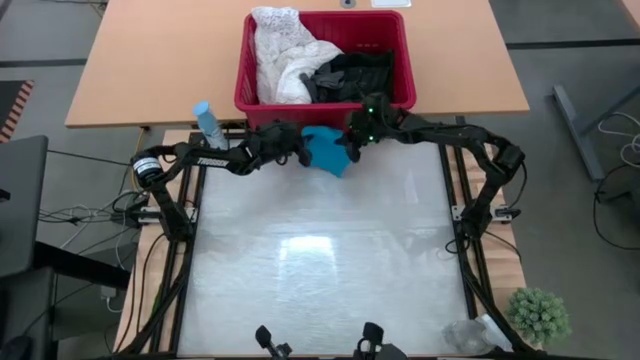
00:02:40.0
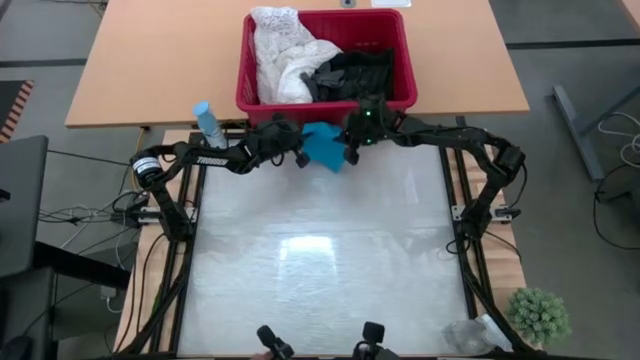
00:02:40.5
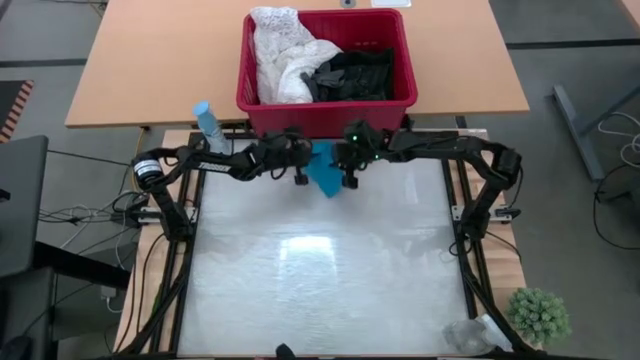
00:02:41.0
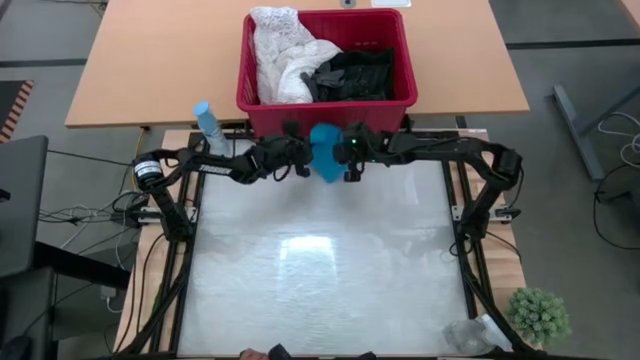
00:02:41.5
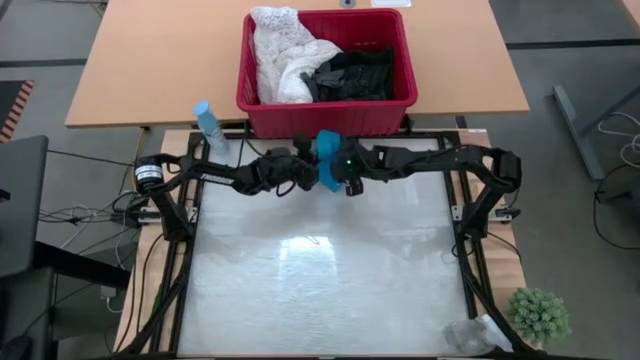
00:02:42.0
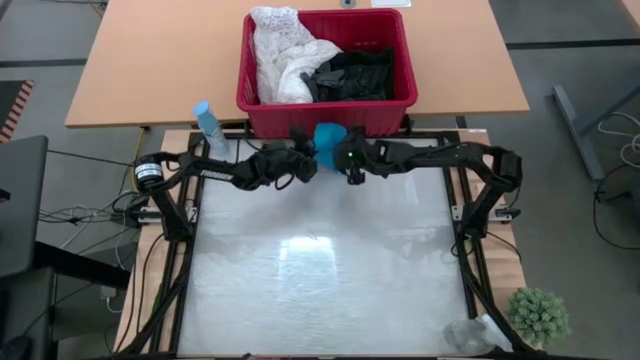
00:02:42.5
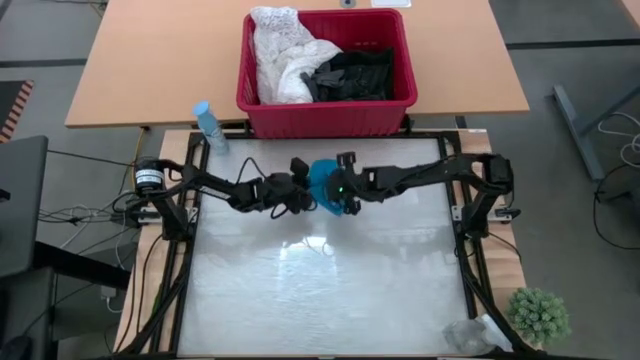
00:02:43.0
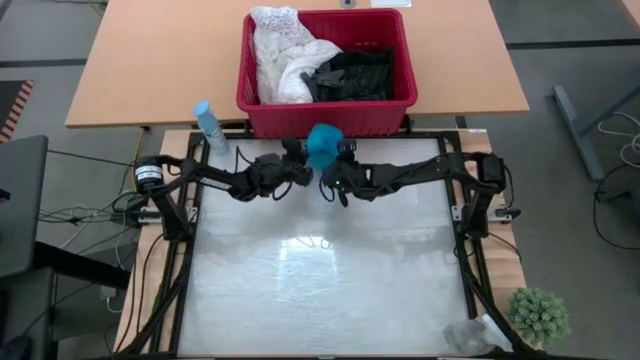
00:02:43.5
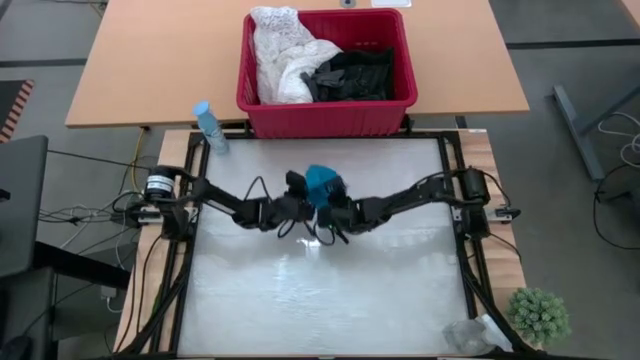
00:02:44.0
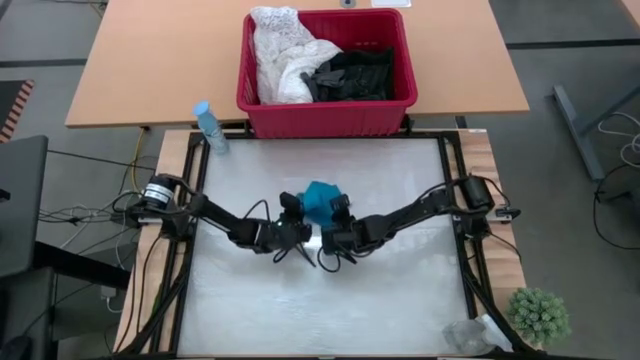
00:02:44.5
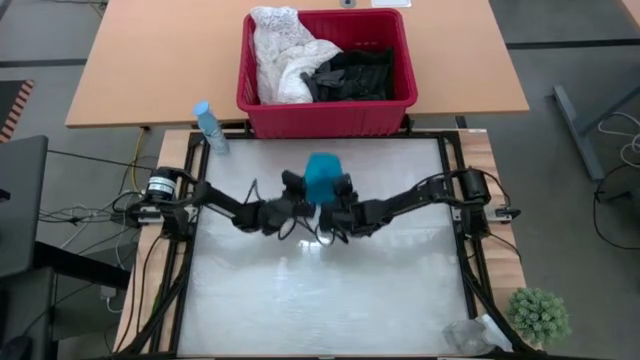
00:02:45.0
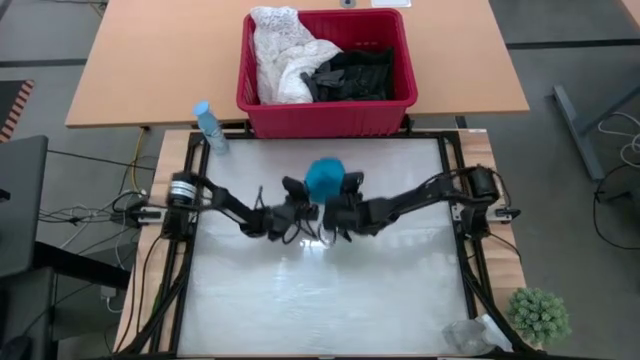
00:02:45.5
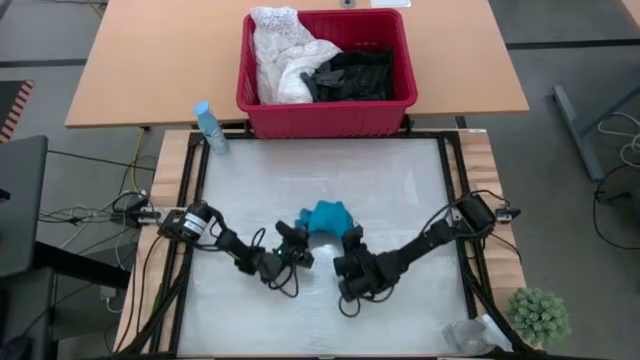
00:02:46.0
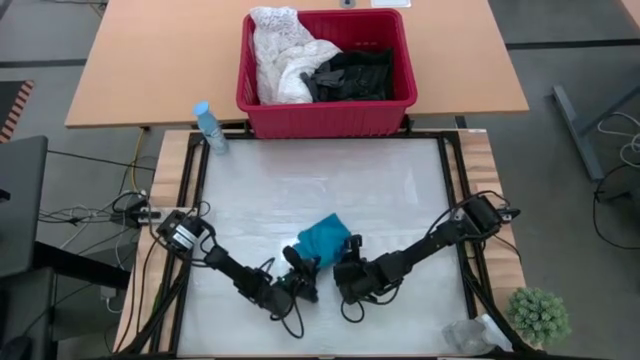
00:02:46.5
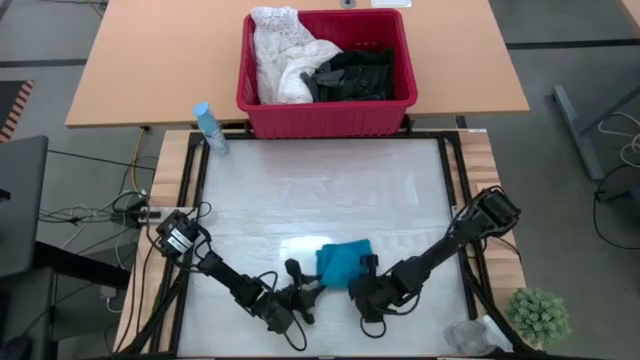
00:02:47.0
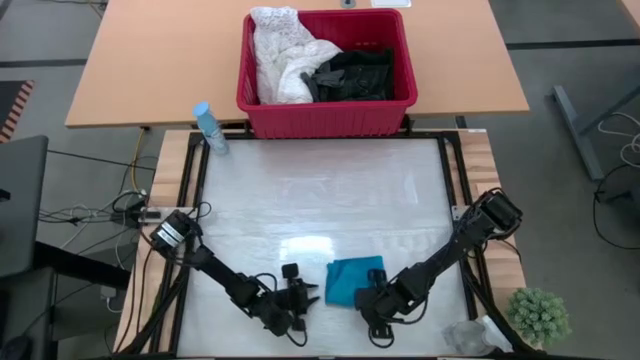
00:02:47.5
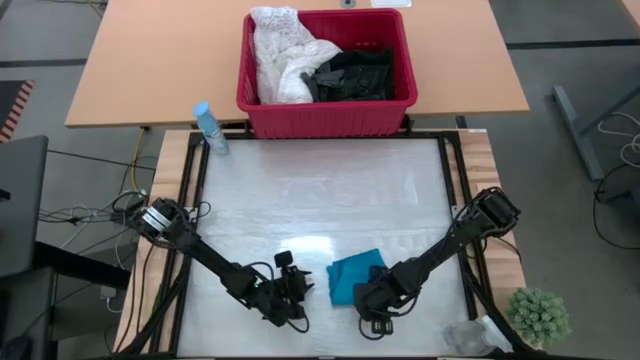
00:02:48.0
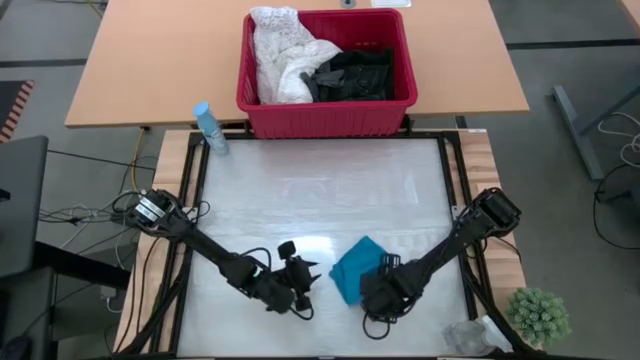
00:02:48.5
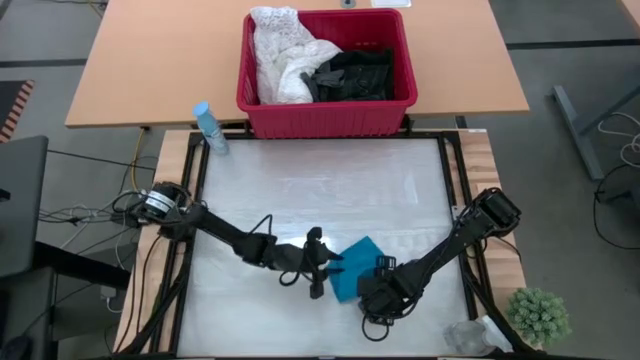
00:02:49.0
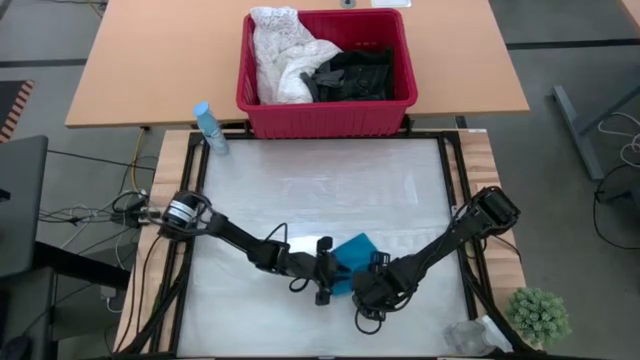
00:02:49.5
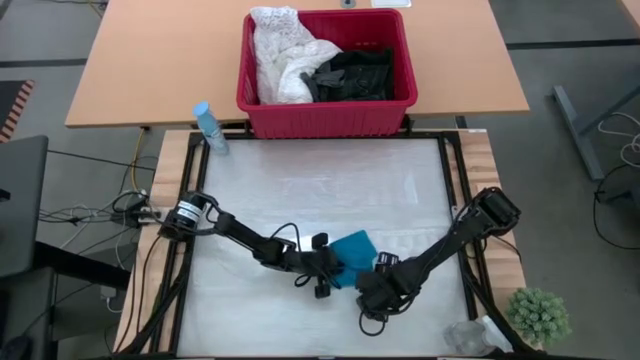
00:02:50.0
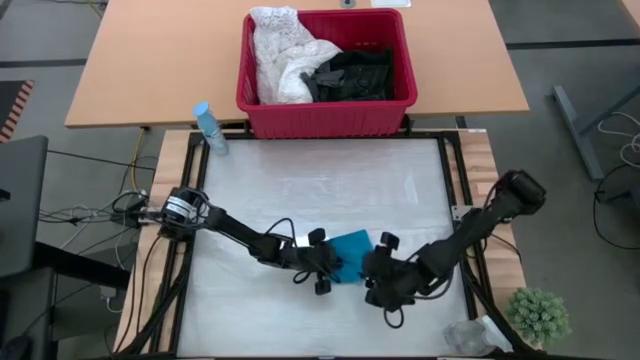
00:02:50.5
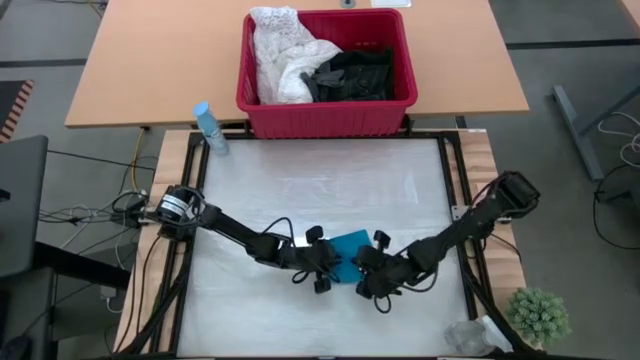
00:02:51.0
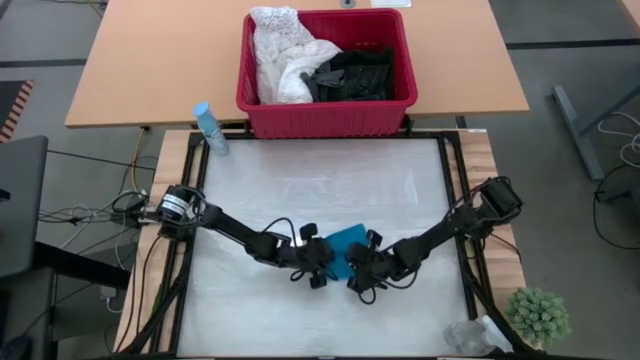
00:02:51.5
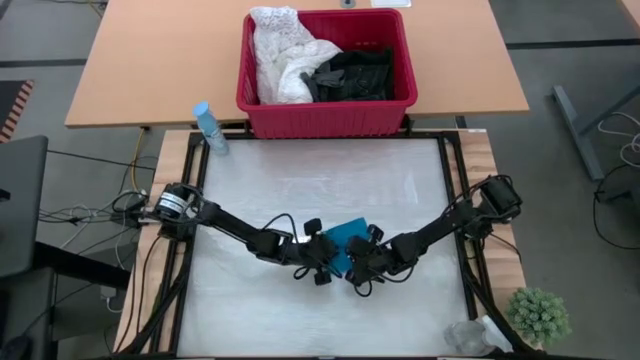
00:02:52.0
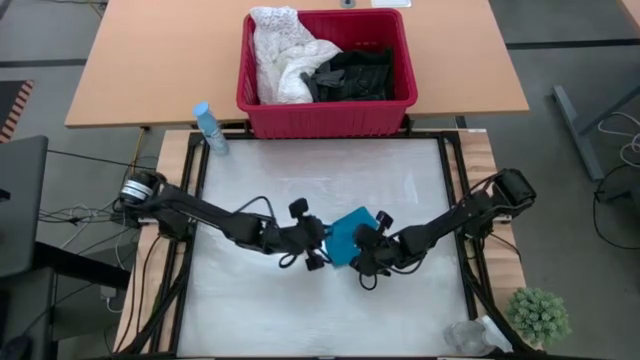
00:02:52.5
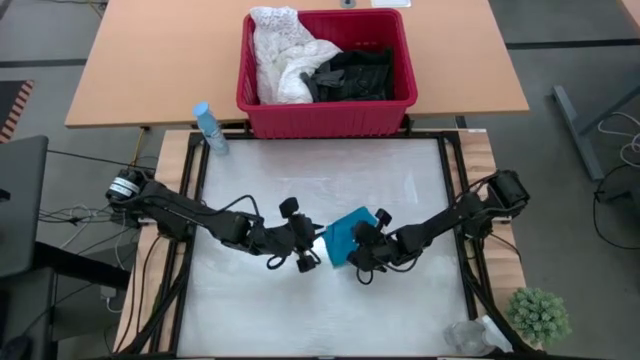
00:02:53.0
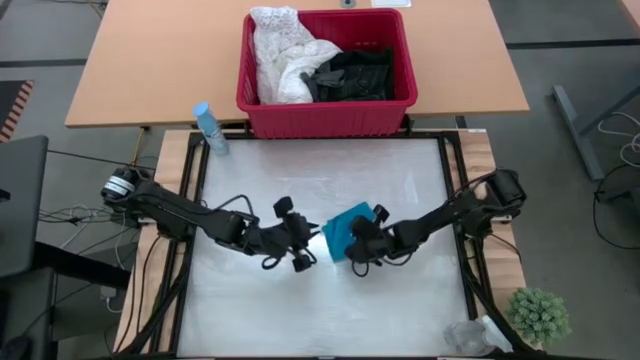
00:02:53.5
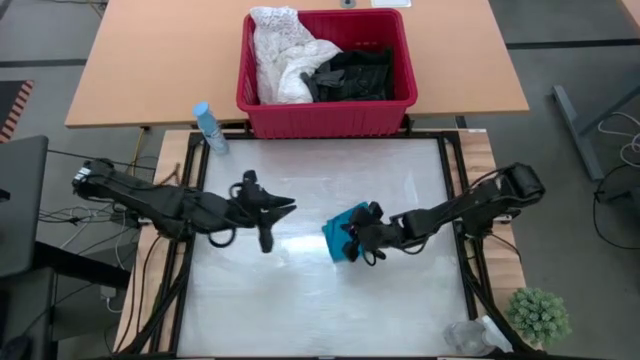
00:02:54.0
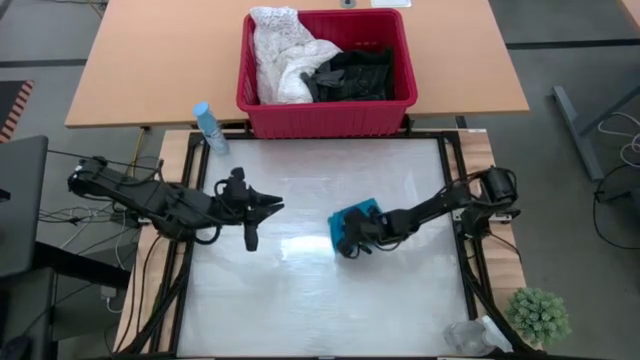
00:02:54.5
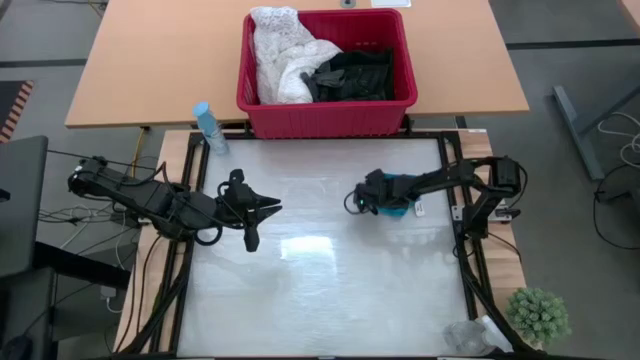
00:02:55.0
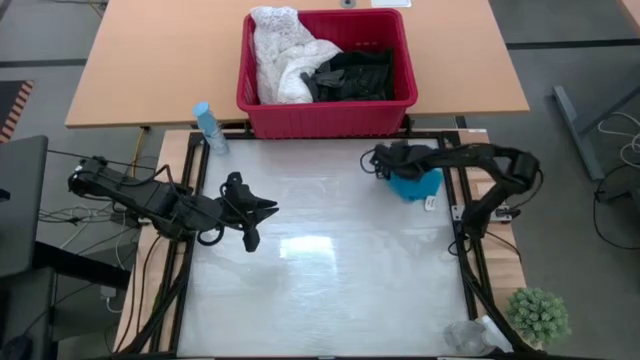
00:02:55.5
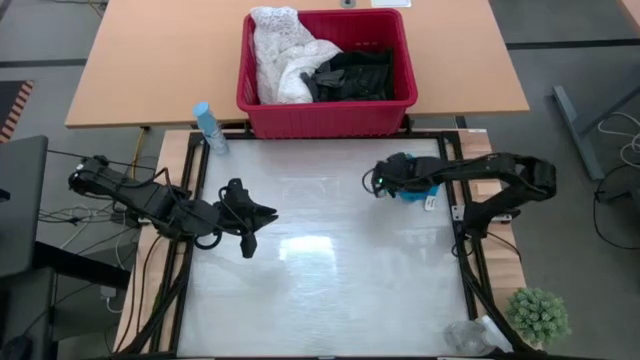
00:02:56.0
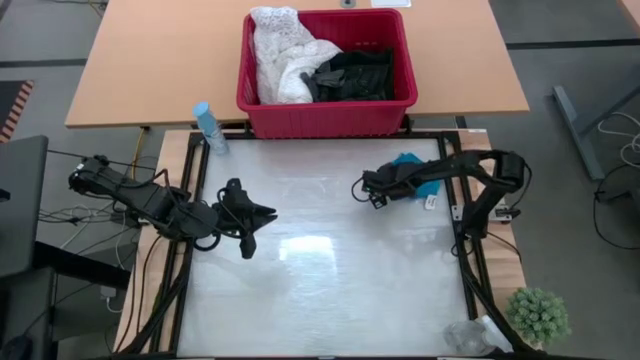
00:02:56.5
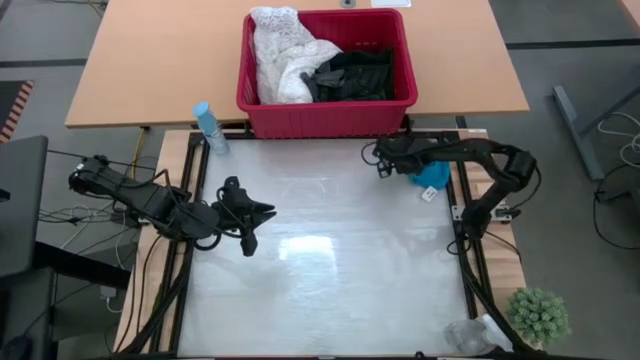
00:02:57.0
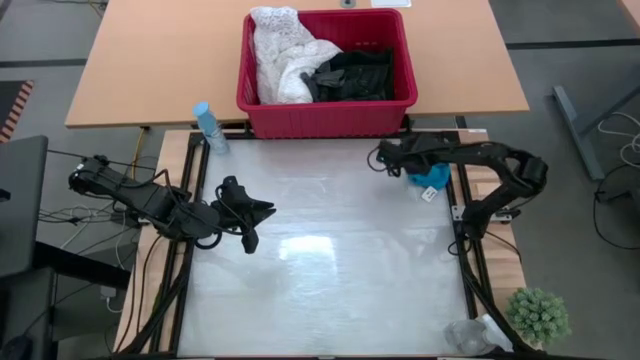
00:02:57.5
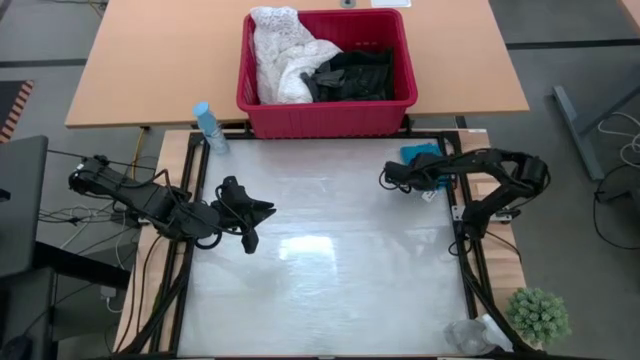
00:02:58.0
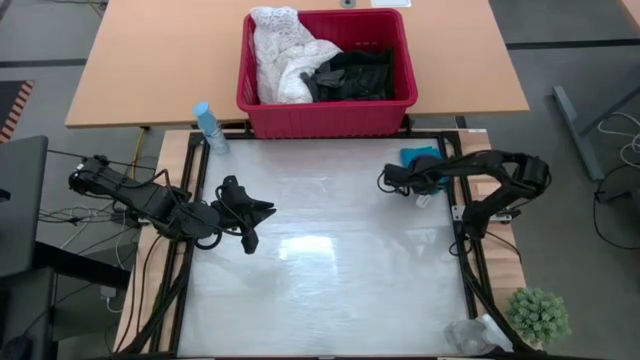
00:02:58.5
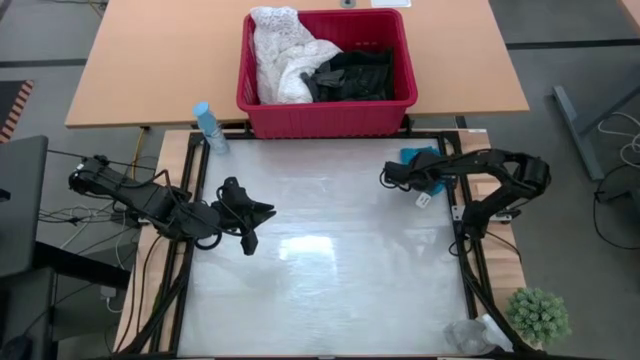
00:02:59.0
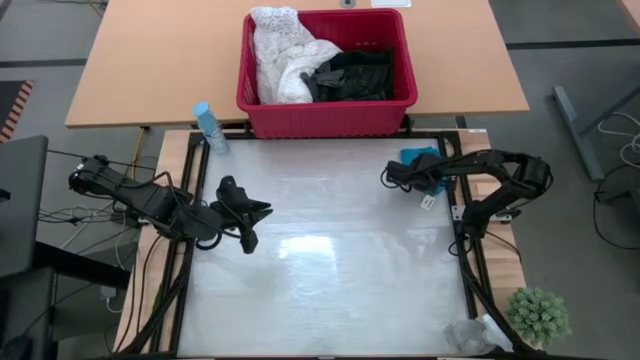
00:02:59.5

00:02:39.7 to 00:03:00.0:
Task: Fold laundry
Fold the blue shorts

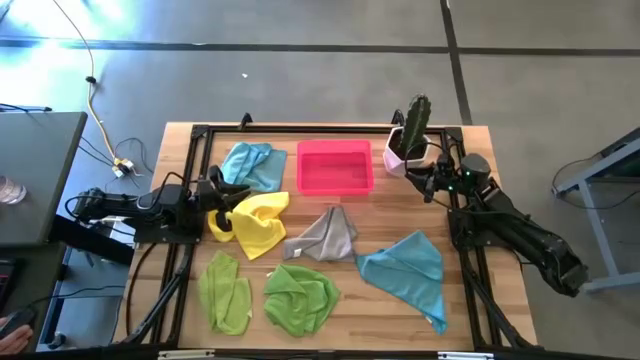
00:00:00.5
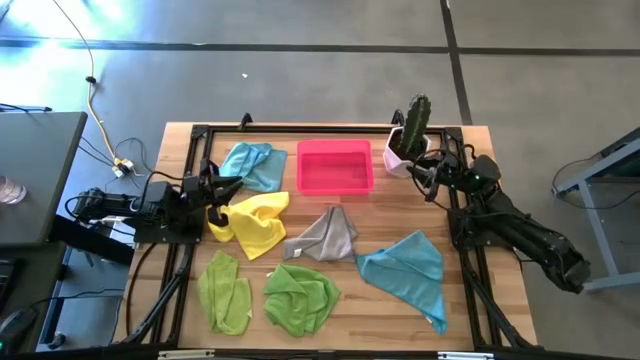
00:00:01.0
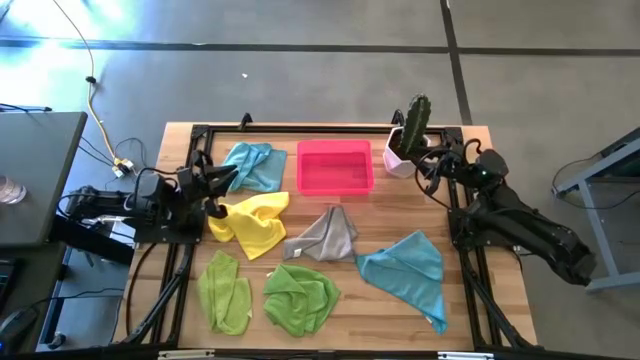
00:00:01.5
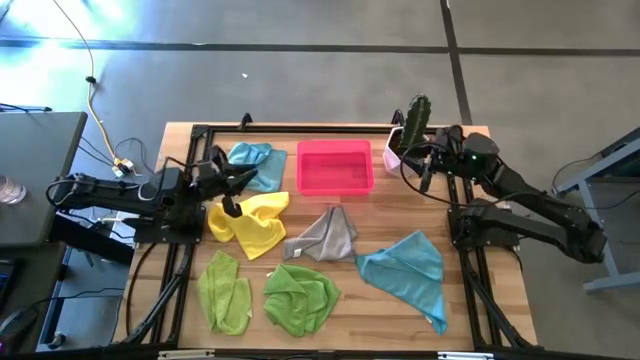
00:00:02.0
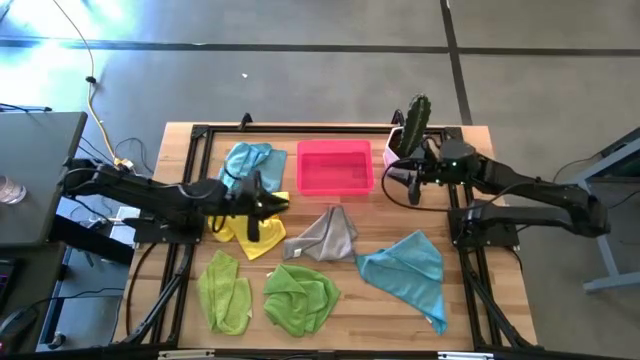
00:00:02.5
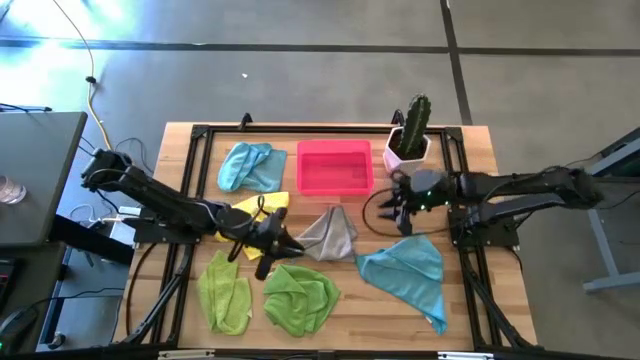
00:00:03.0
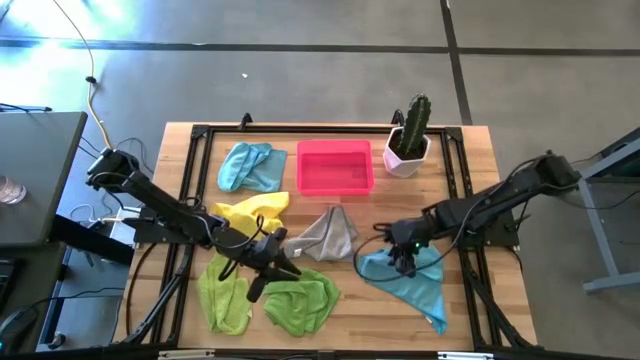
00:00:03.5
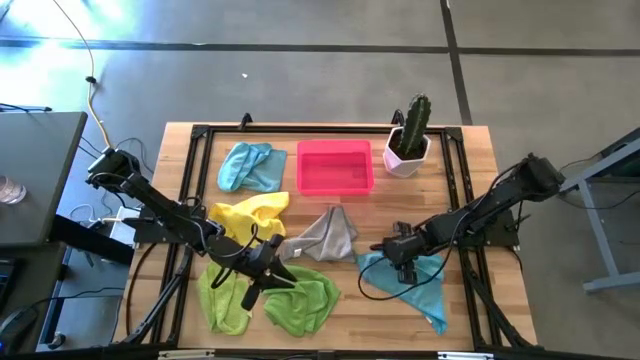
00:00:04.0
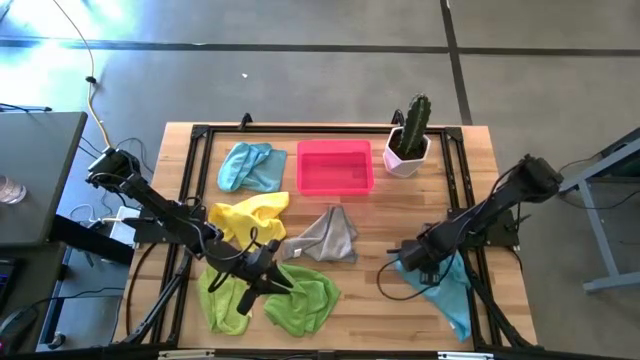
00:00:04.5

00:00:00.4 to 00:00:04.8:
Task: Fold microfiber towels
Adjust the bottom blue microfiber cloth
